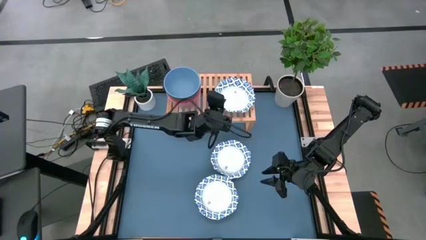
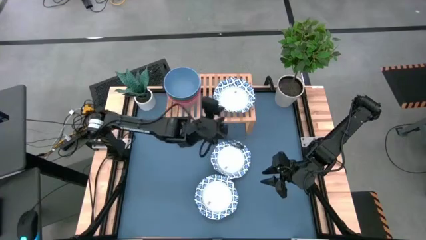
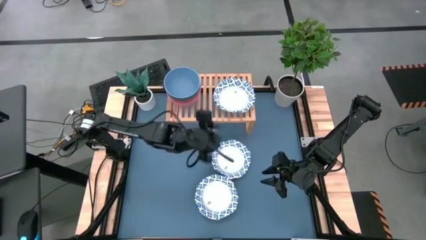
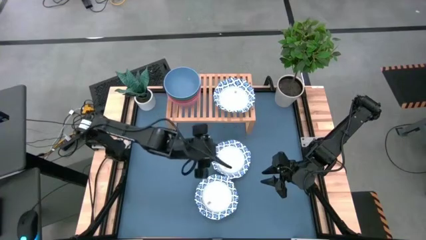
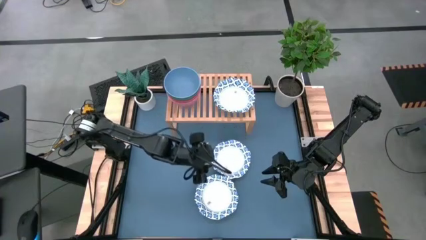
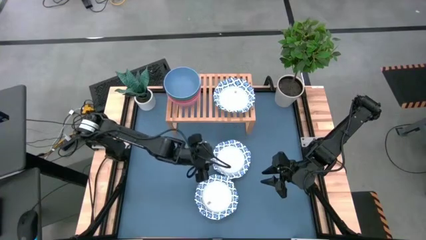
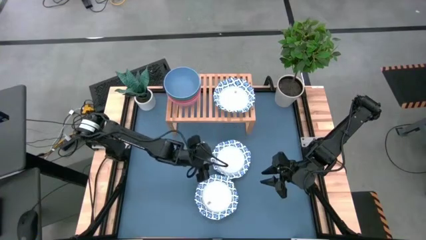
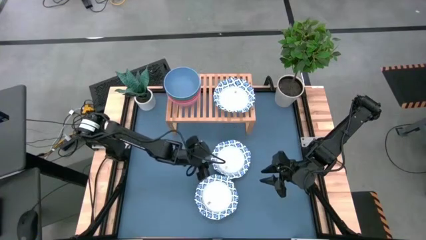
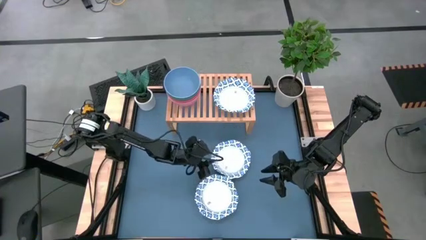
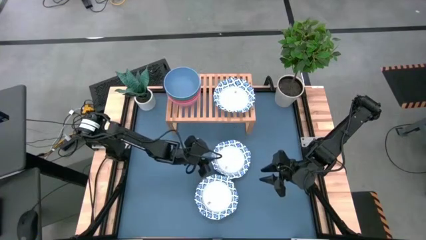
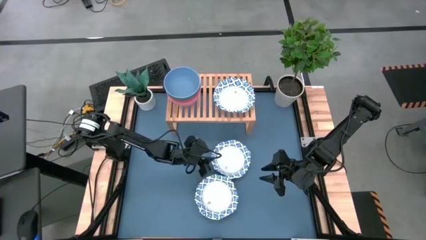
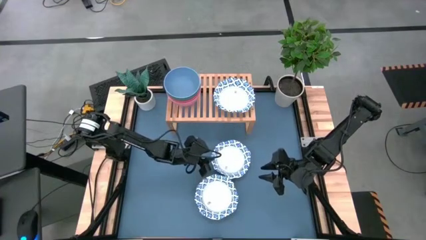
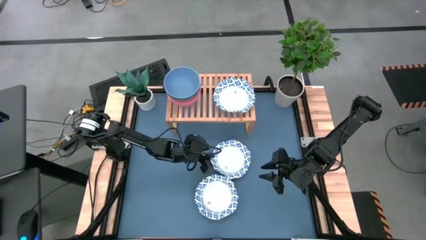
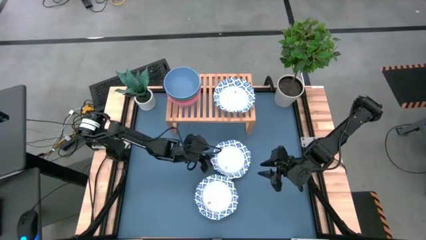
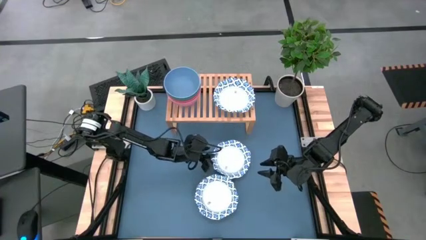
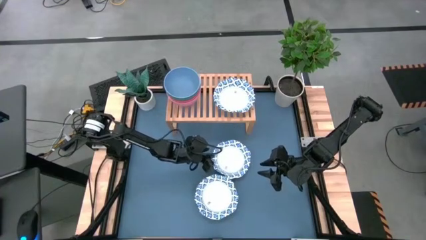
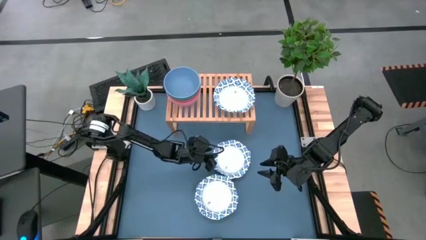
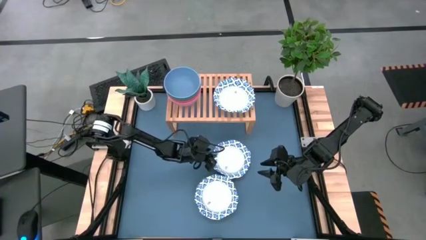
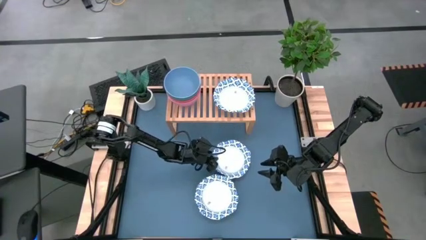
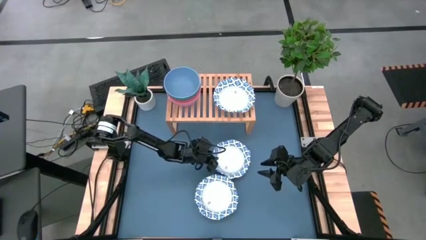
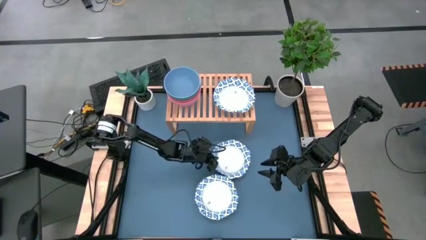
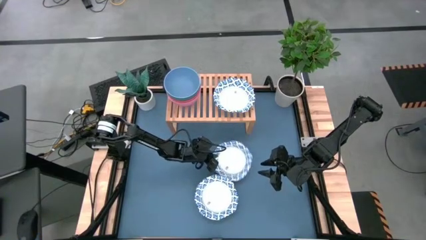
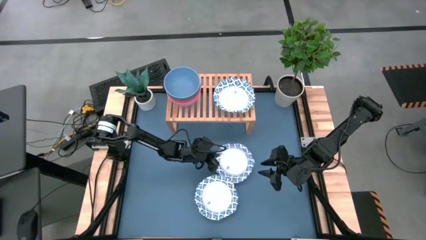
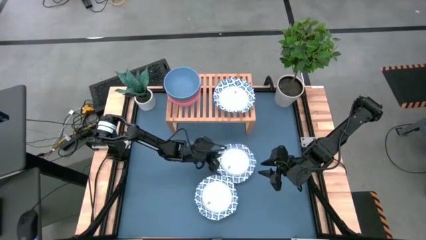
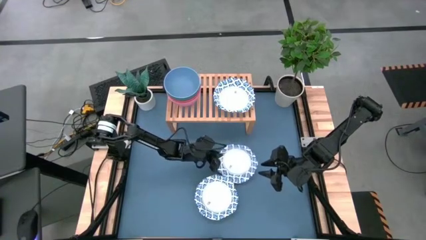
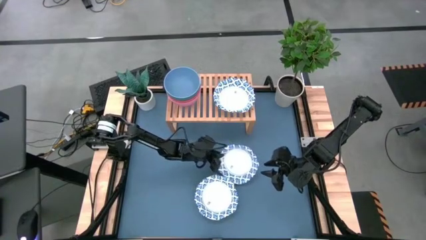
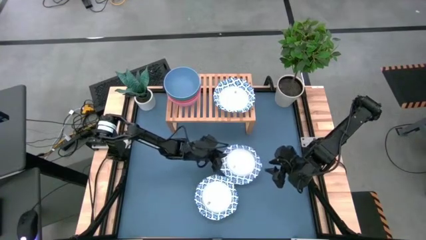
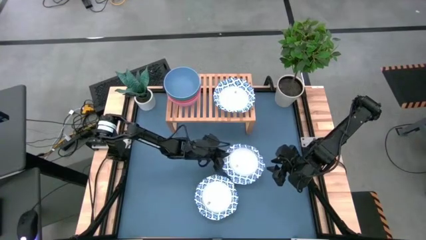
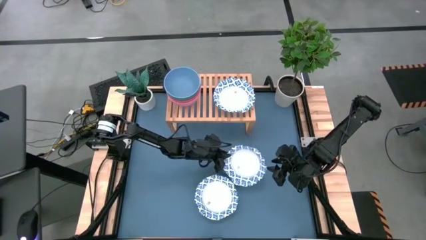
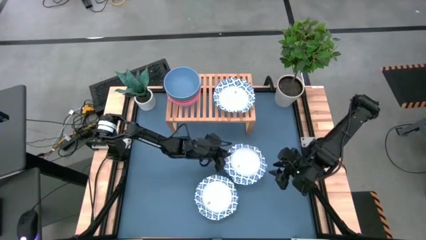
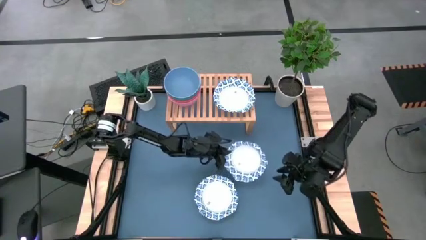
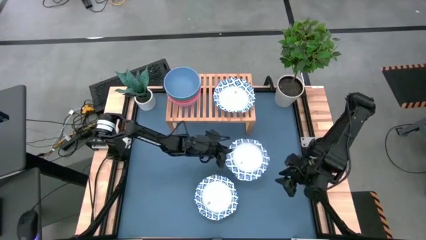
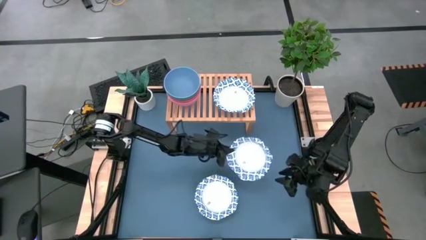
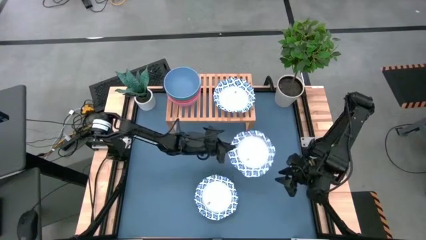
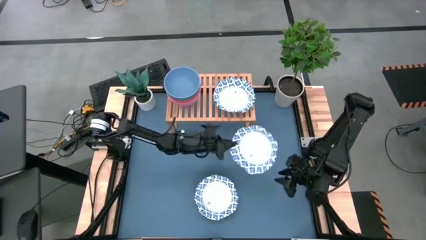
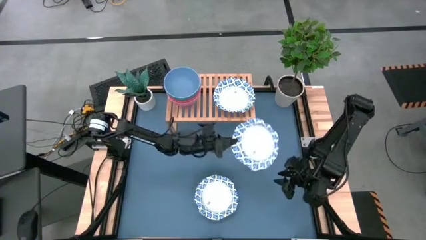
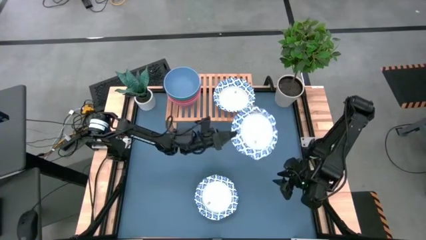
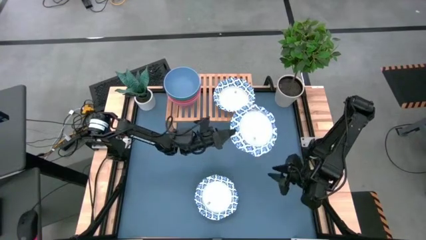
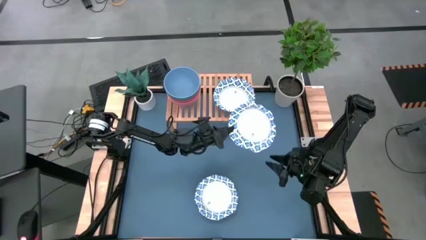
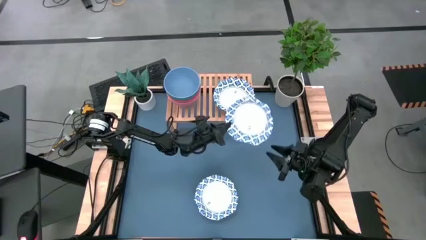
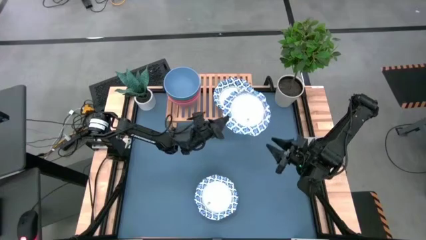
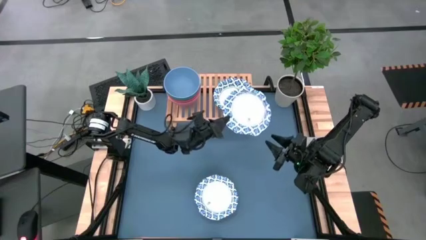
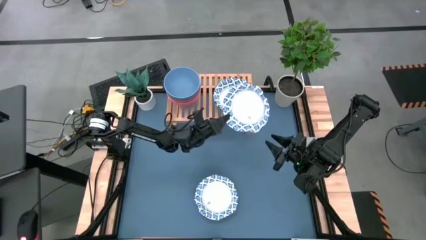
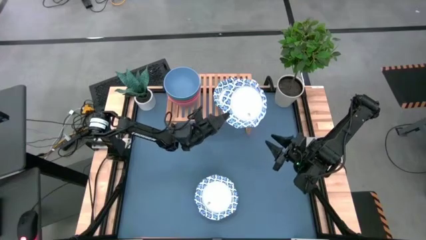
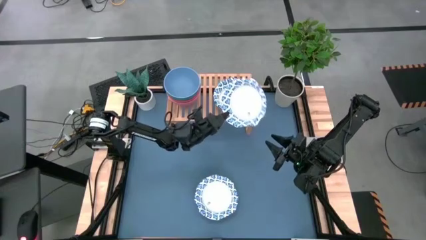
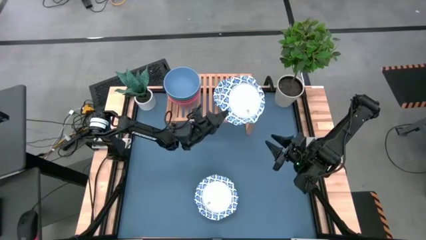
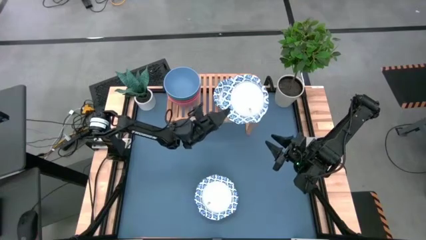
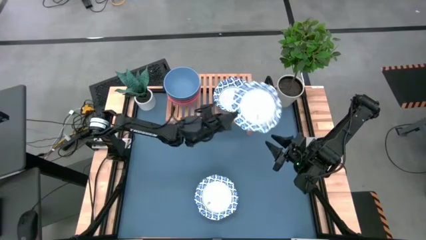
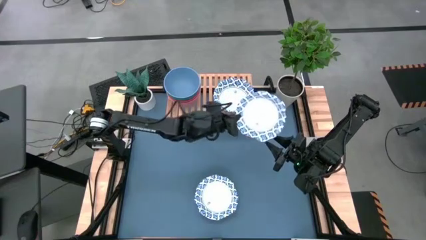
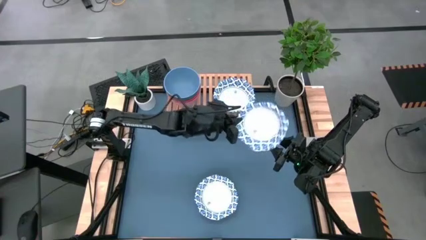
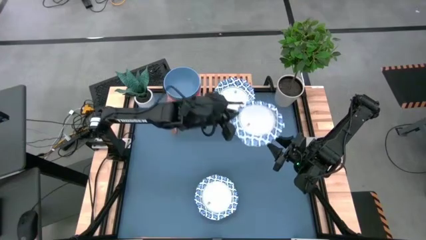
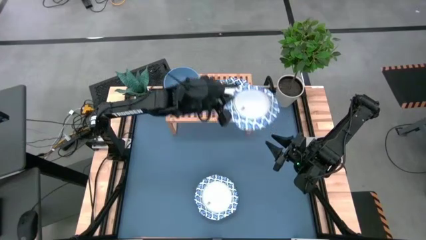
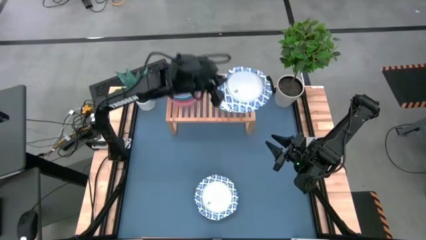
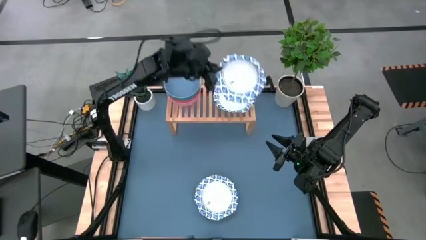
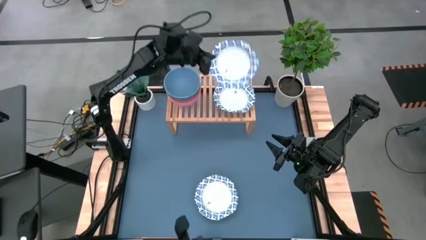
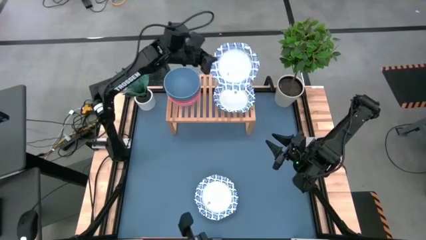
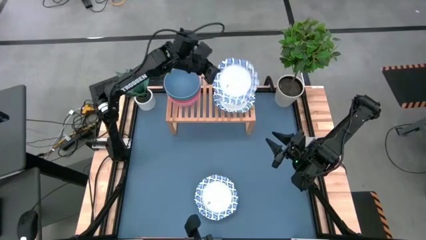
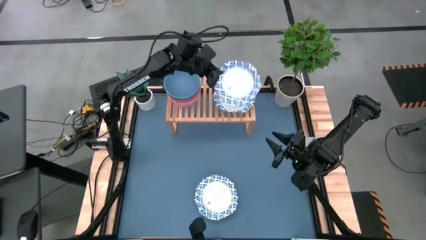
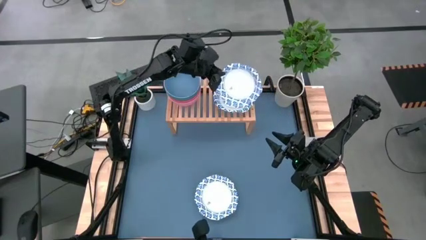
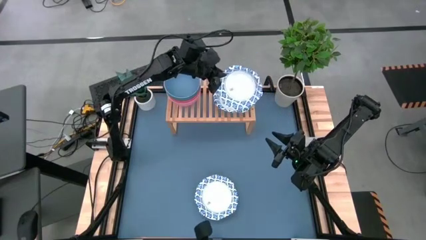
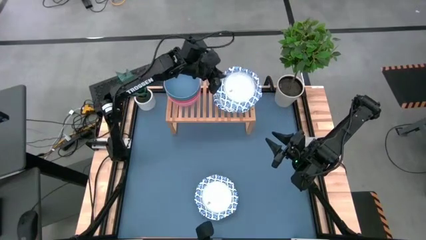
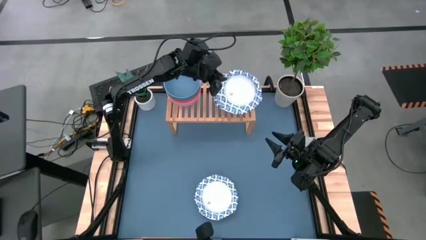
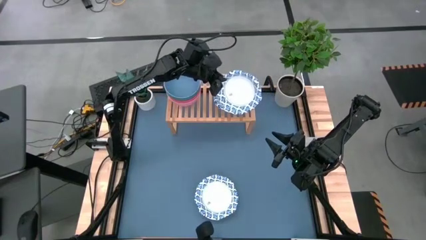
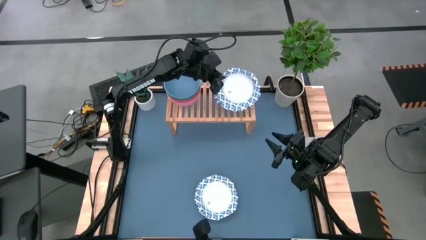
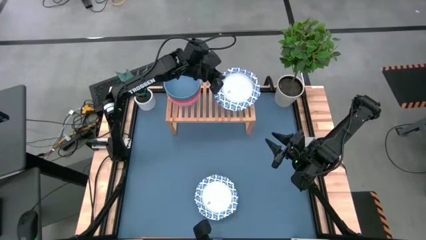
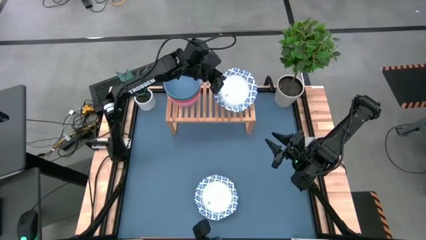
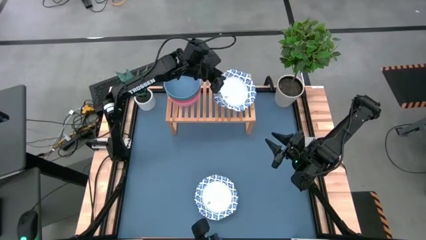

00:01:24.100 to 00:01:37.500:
Task: Place and stack bowls onto a shelf
Stack the top white patterned bowl on top of the other white patterned bowl on the shelf
